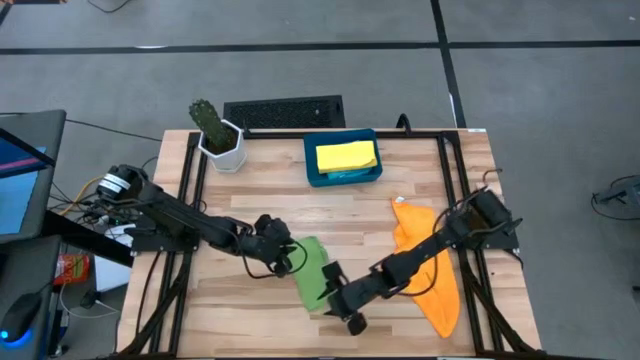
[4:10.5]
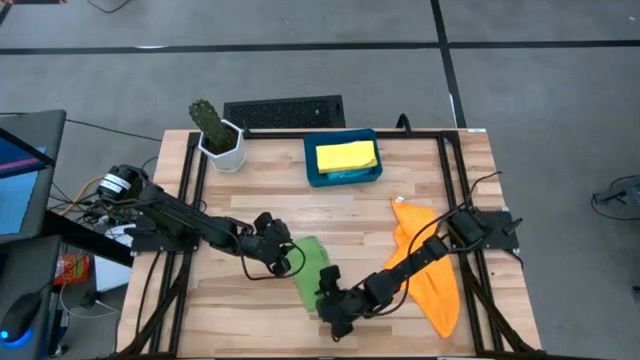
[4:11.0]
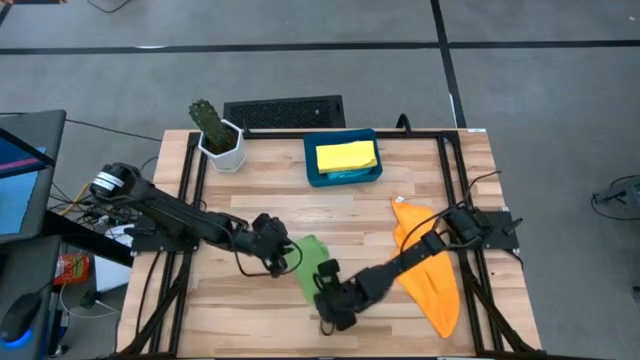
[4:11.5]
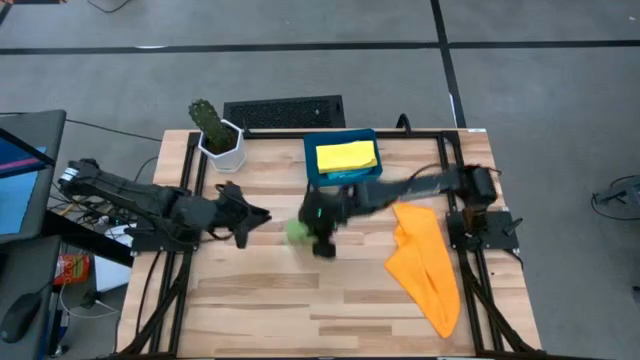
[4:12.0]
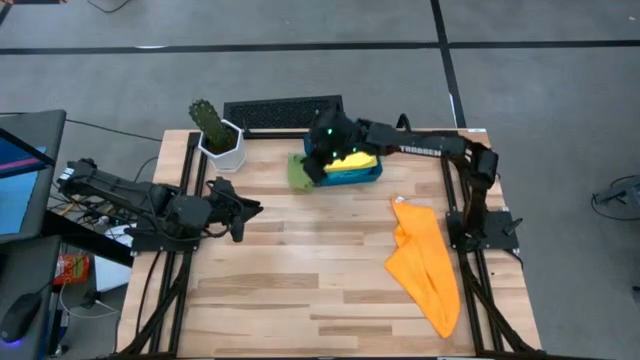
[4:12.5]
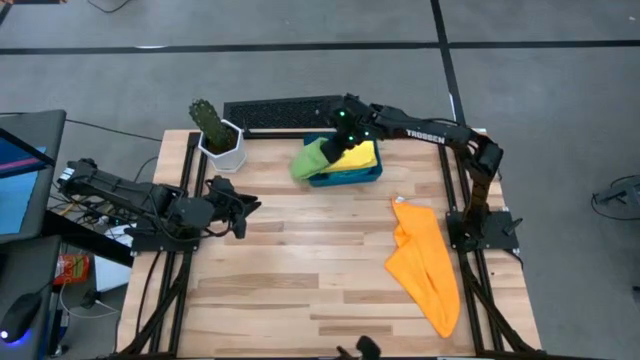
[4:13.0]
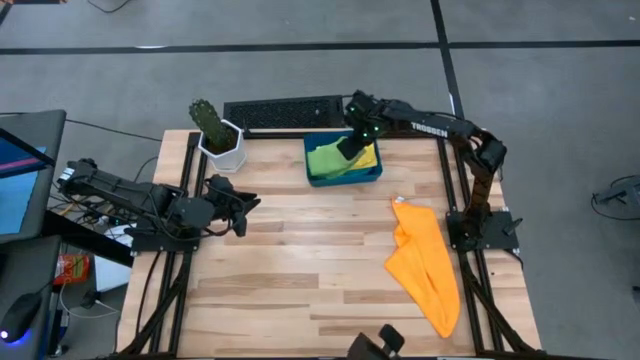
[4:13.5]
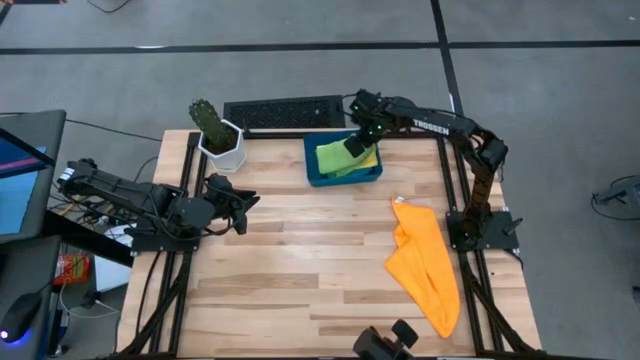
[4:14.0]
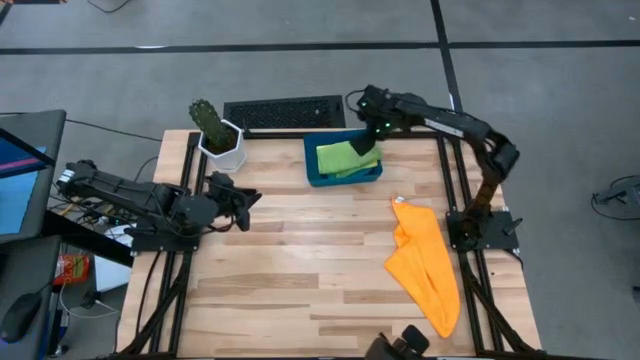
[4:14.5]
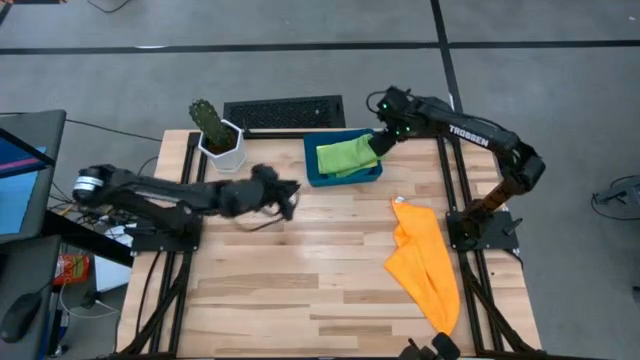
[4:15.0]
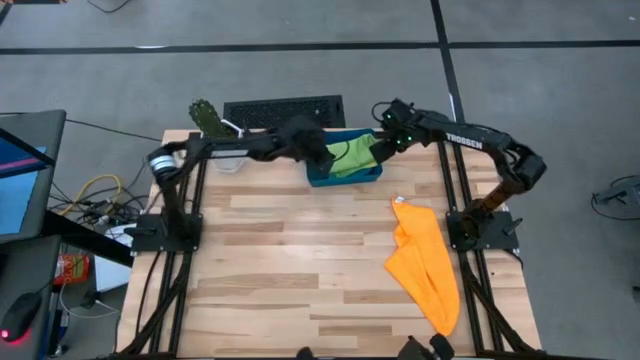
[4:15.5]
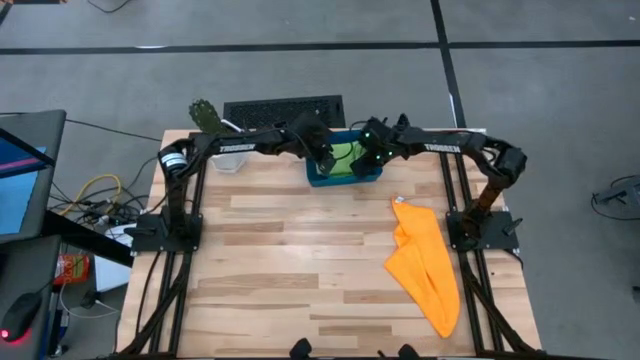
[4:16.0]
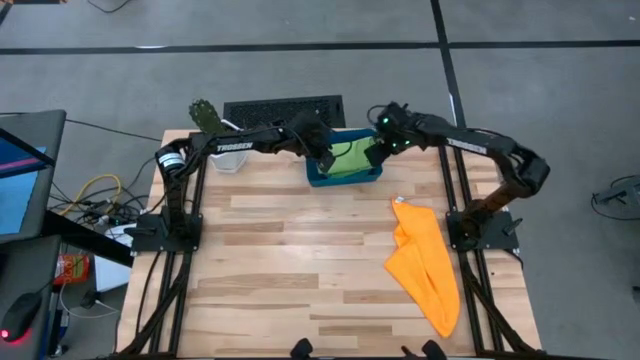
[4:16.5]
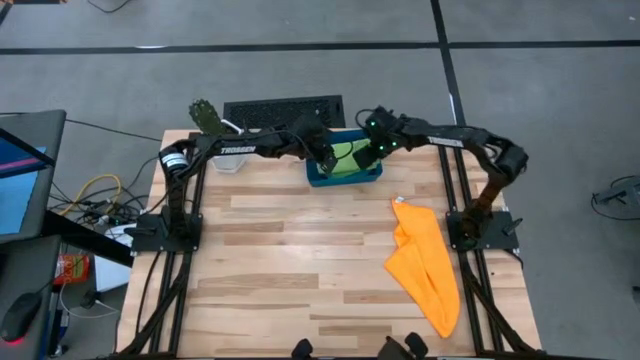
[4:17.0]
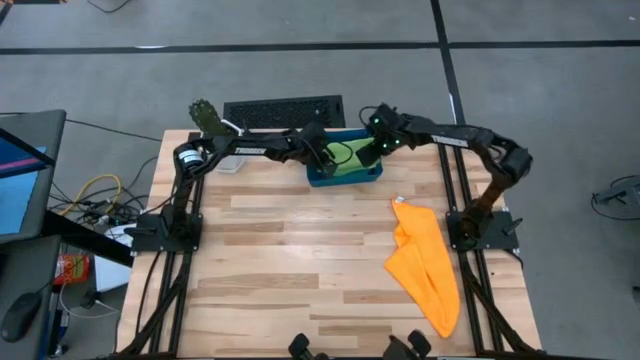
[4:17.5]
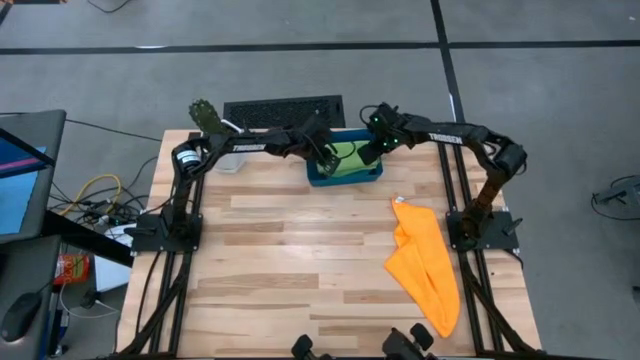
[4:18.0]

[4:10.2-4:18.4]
Task: Fold microfiber towels
Put the folded green microfiber cloth into the blue bin

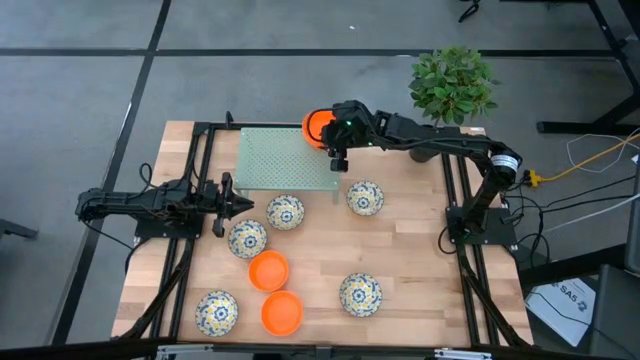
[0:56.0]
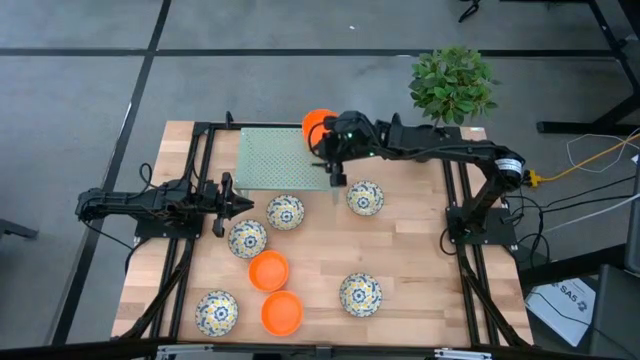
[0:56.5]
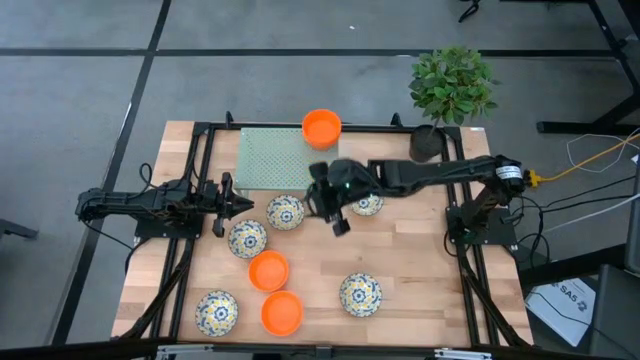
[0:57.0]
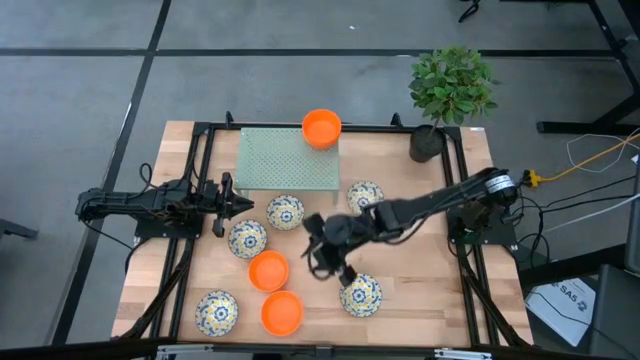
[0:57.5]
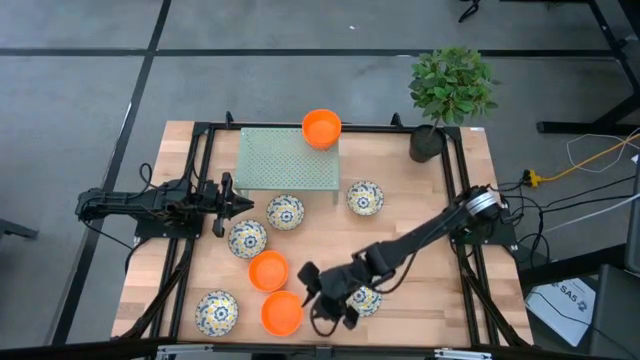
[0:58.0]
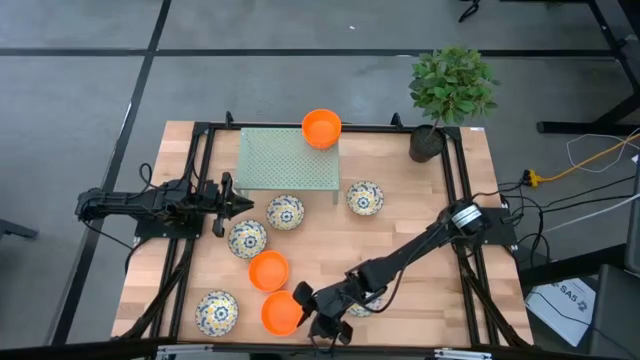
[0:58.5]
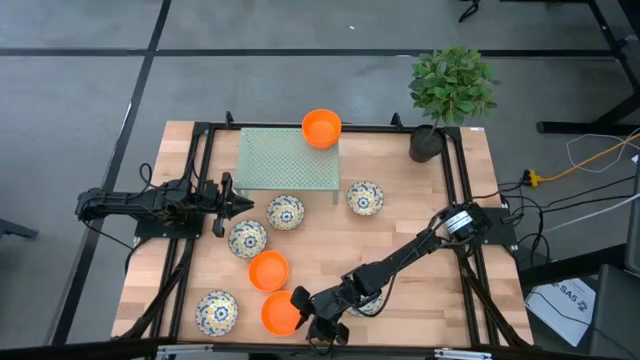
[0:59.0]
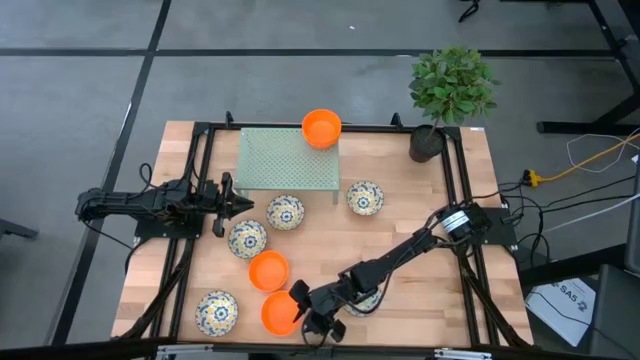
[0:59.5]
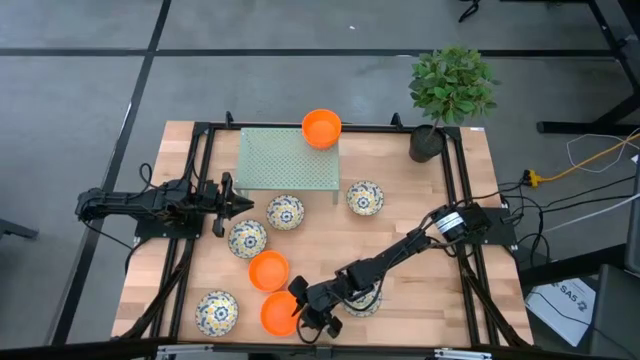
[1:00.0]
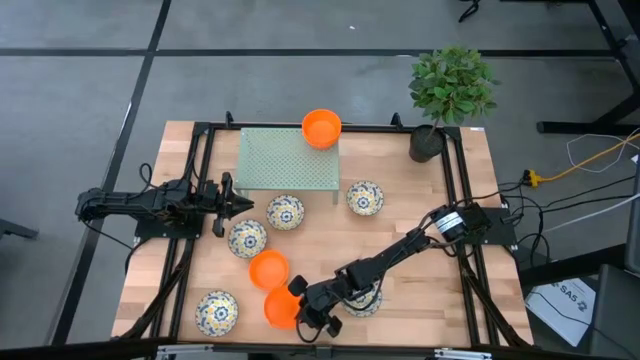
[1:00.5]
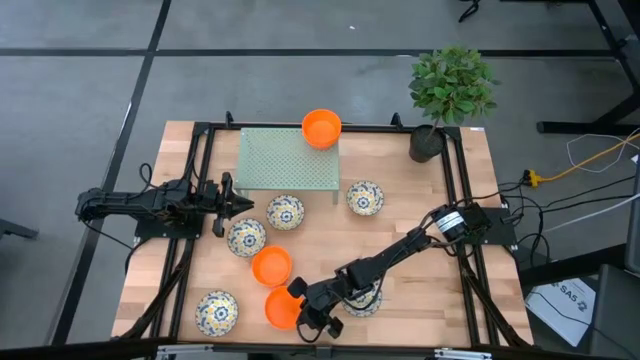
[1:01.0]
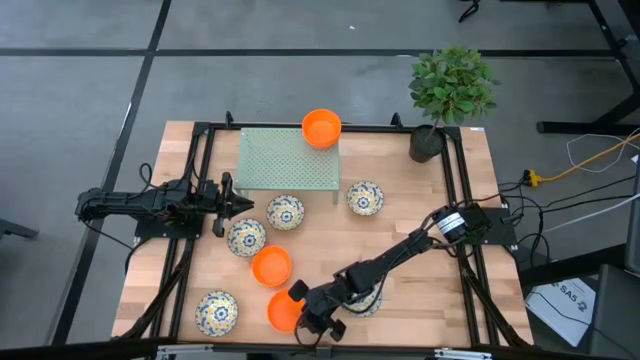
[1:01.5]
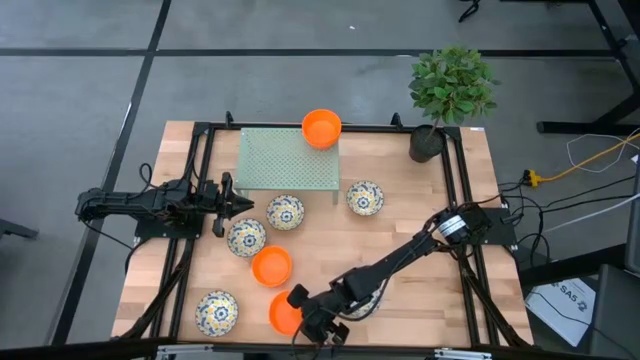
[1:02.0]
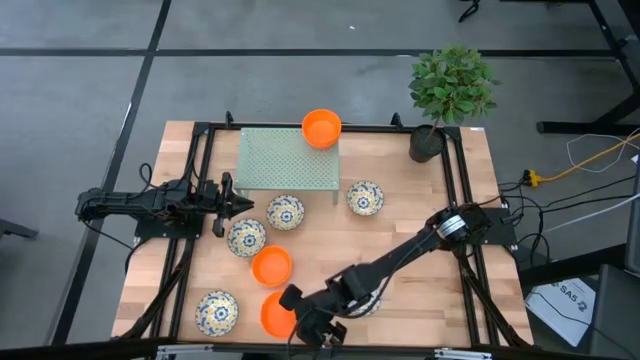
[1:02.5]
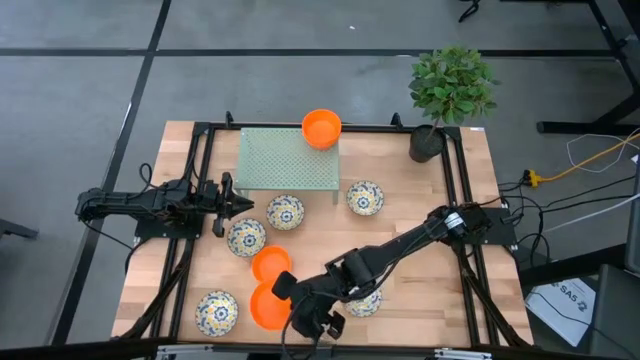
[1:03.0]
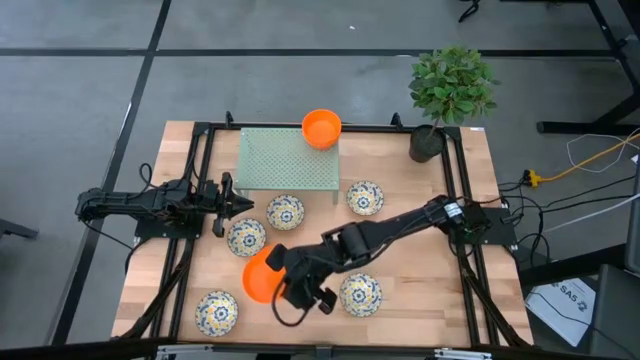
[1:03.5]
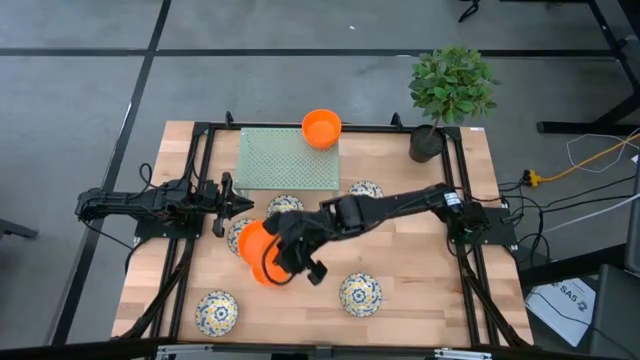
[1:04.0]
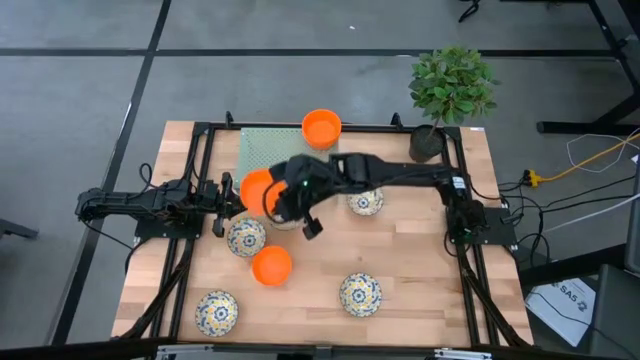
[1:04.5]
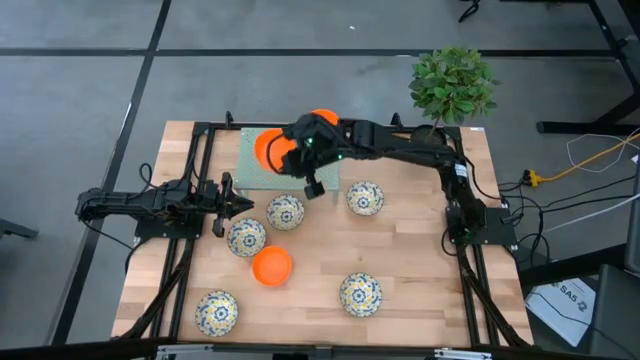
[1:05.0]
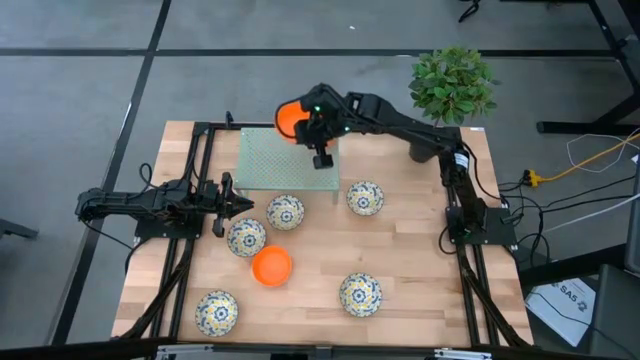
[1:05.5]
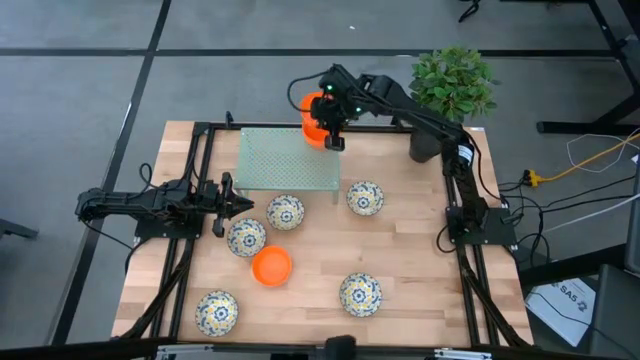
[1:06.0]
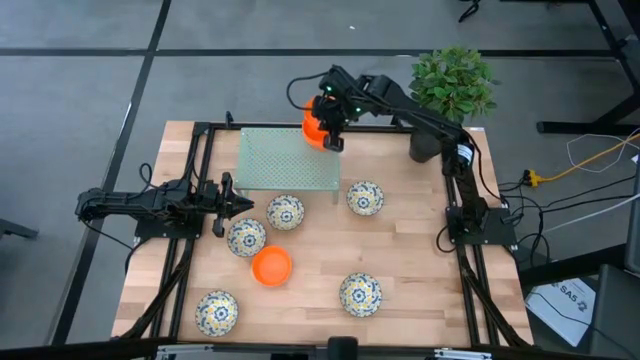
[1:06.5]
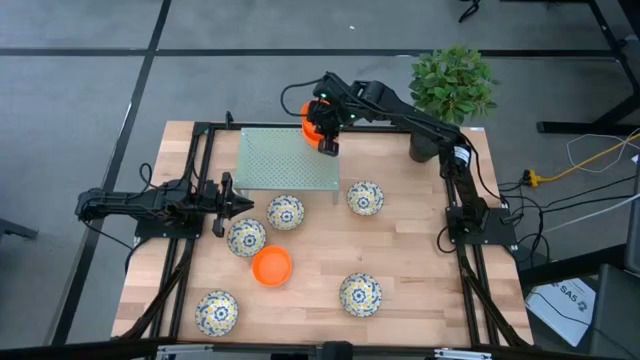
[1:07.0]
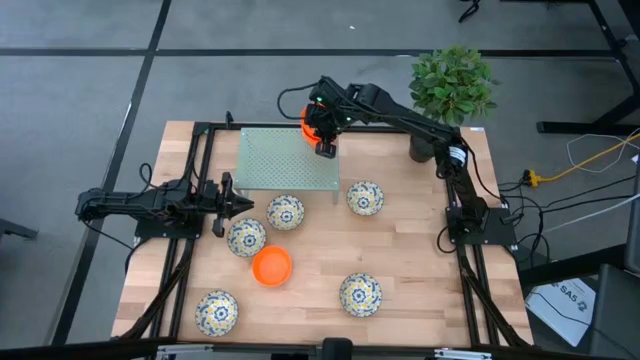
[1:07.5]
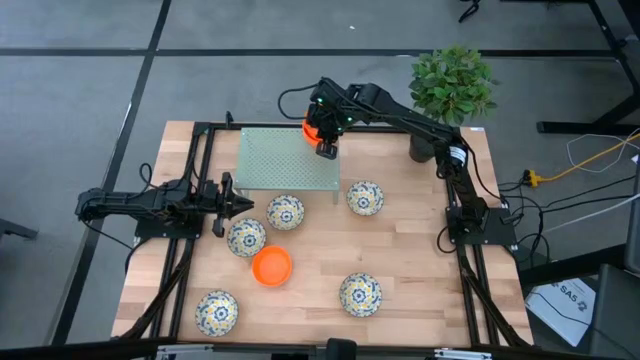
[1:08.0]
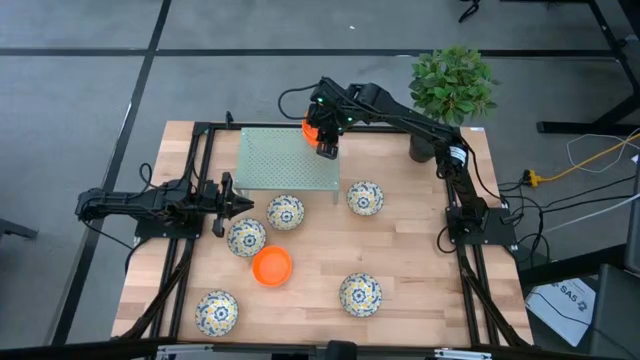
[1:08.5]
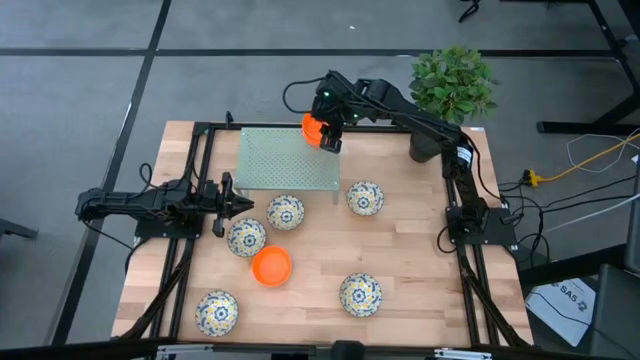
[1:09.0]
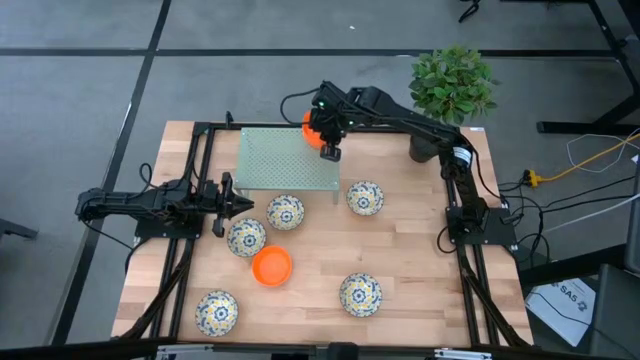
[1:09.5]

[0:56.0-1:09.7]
Task: Pick & Place Mini bowls
Stack the orange bowl on top of the other orange bowls on the shelf
